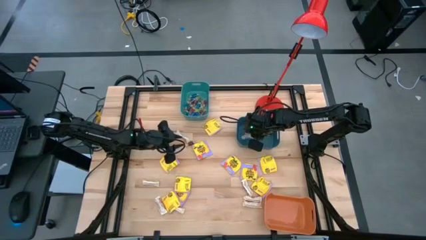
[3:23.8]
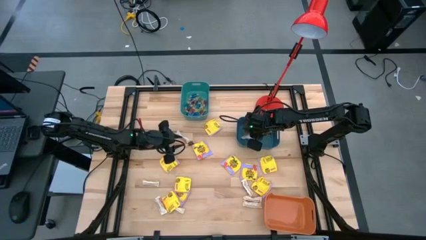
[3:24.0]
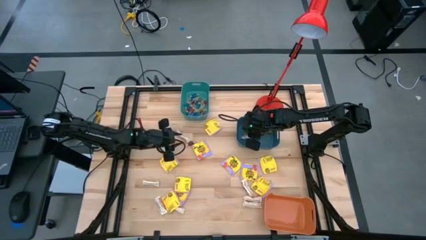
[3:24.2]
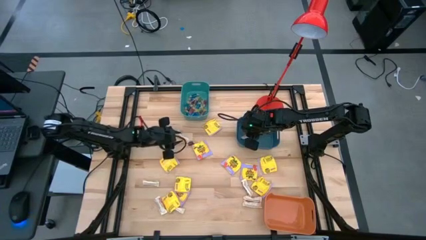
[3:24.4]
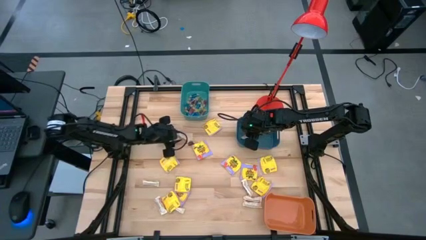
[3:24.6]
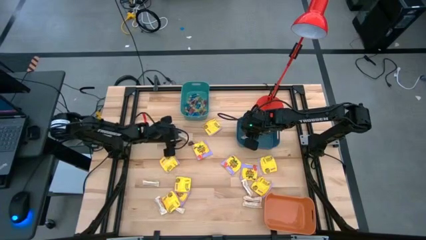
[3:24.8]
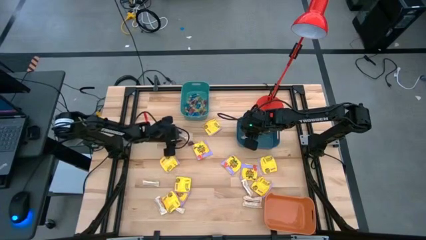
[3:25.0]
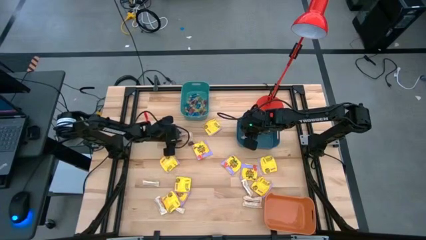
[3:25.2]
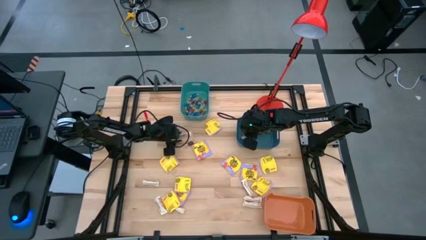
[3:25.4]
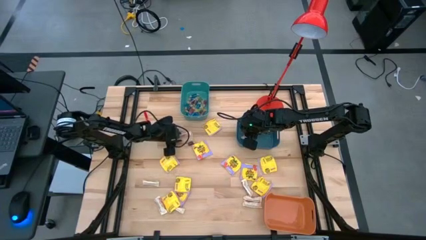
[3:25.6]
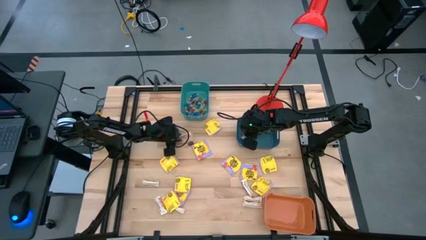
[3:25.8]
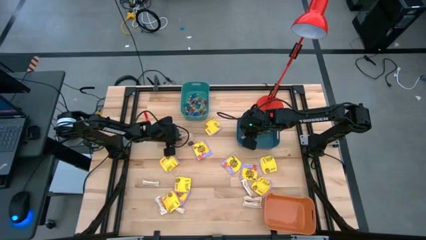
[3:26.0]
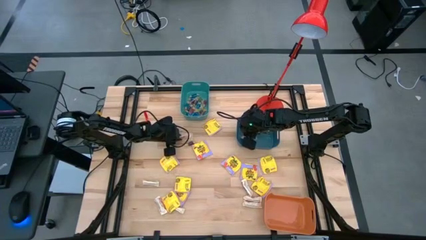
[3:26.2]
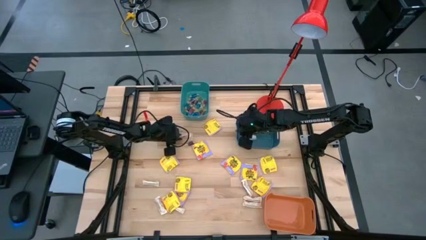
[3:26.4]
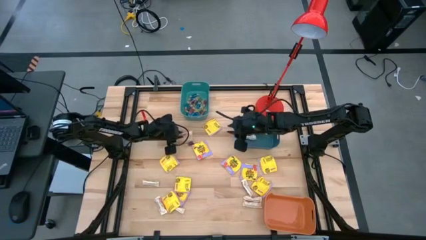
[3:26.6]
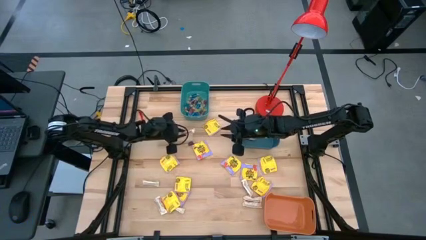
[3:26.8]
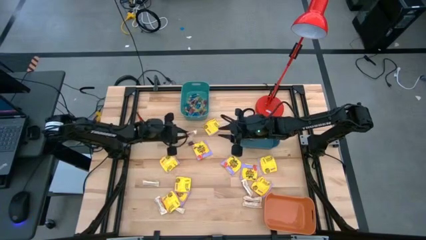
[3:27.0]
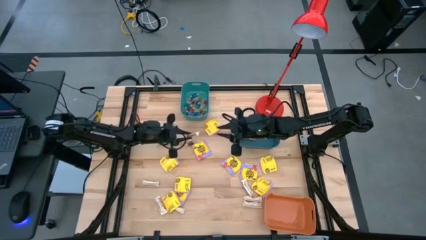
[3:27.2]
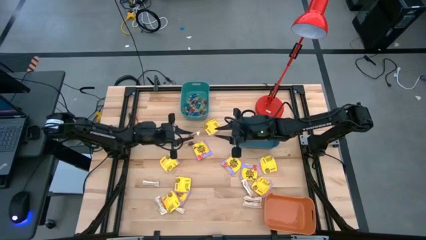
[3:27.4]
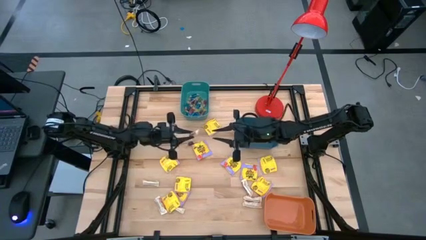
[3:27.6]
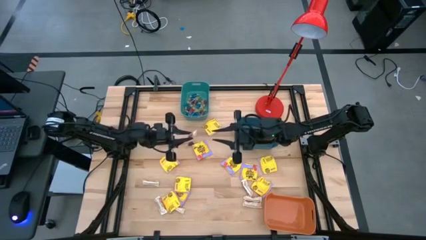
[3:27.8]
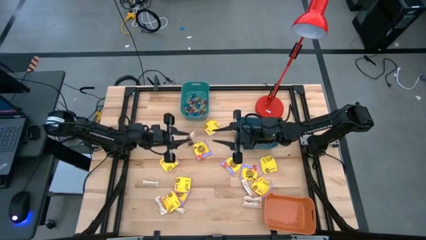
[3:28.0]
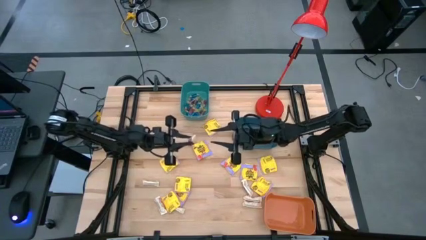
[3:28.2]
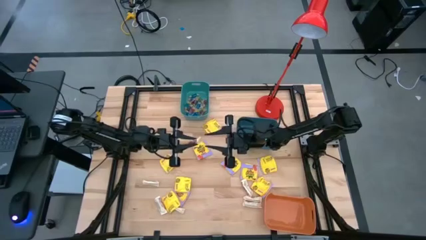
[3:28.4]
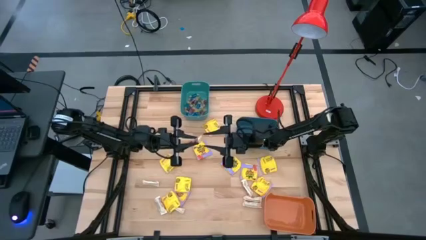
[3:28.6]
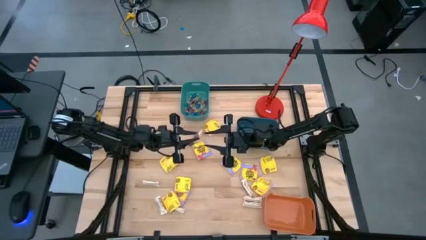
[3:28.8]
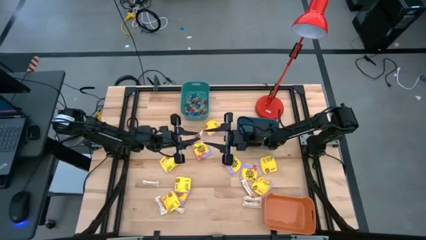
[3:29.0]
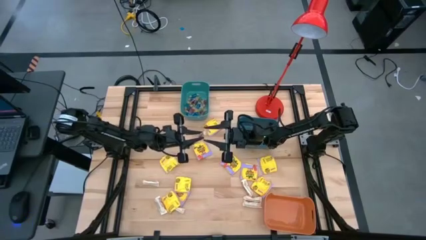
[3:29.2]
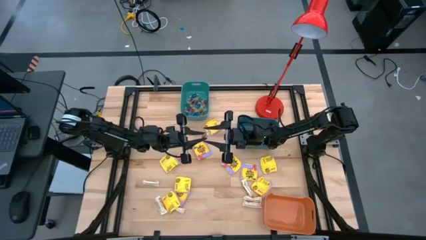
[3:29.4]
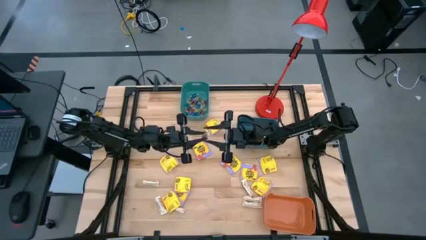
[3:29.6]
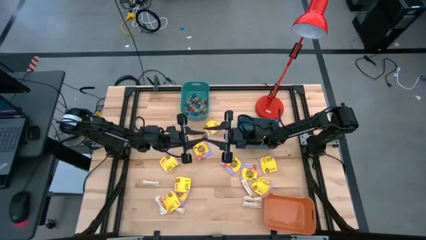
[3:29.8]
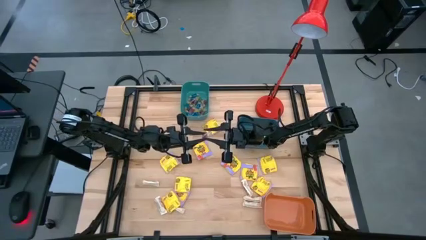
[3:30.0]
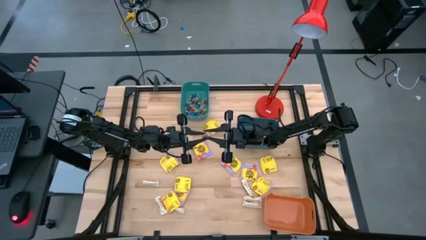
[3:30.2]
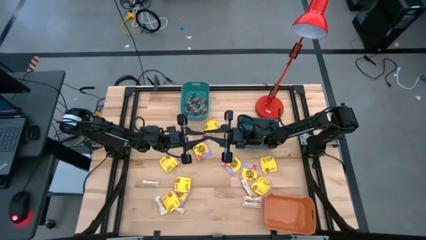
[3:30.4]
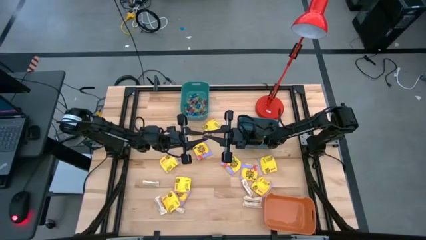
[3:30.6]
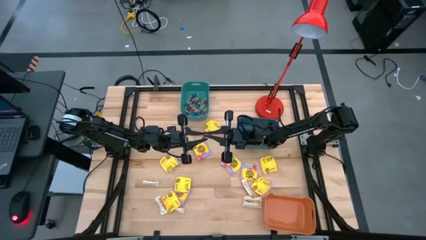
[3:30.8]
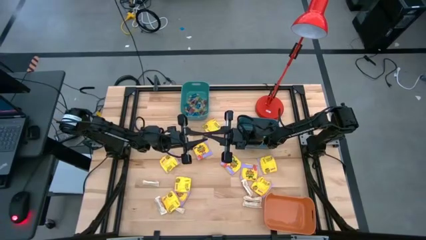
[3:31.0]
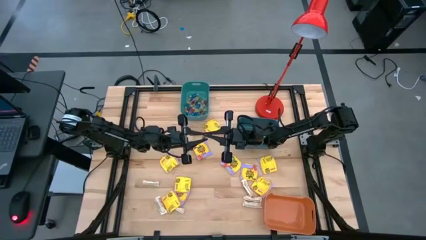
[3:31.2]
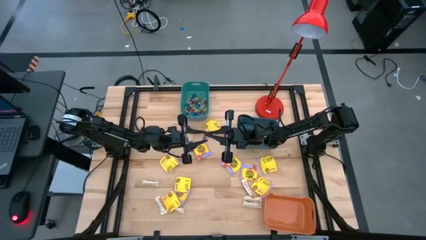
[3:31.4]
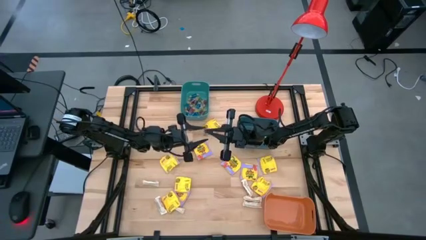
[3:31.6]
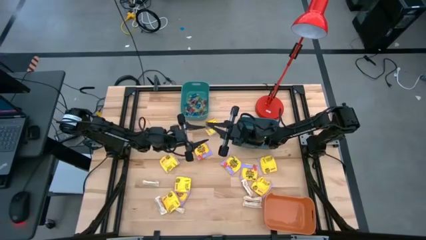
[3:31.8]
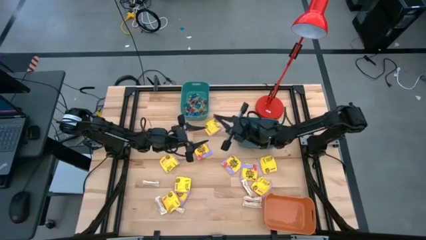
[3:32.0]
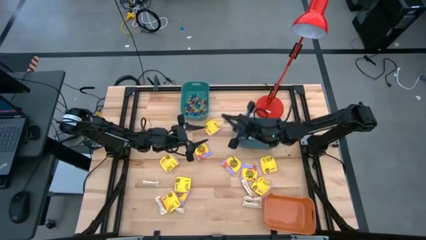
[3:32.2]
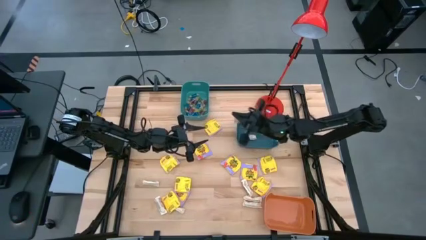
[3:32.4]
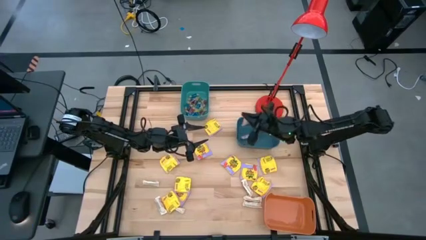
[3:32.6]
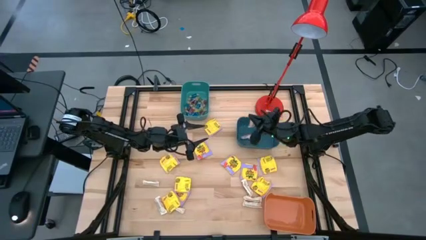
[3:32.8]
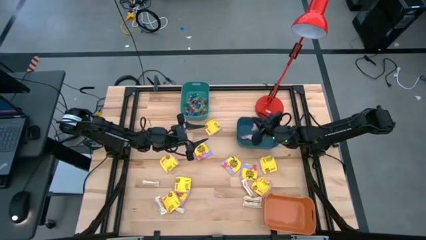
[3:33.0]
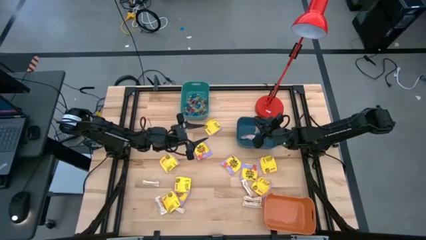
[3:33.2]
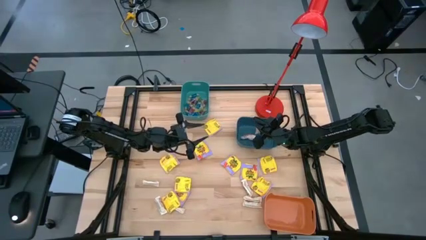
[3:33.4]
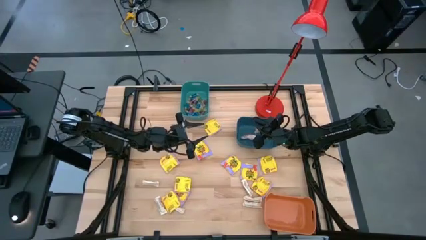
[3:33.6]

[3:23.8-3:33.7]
Task: Sort candy
Put the white chocolate bar into the blue bin

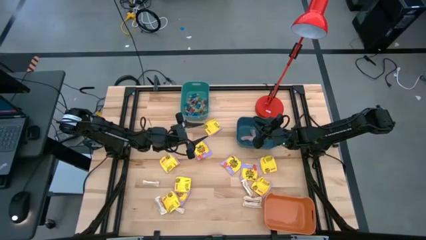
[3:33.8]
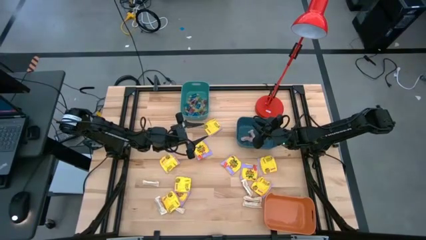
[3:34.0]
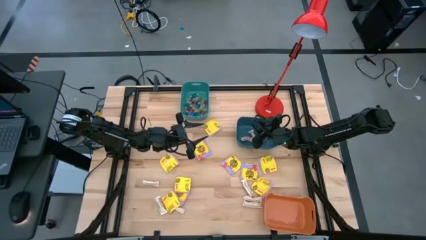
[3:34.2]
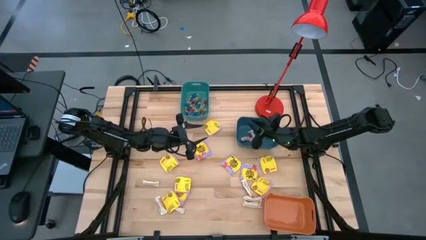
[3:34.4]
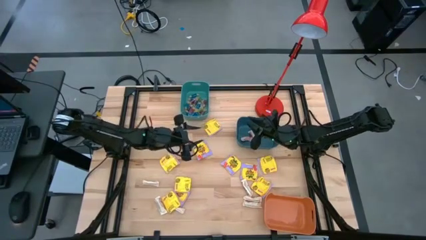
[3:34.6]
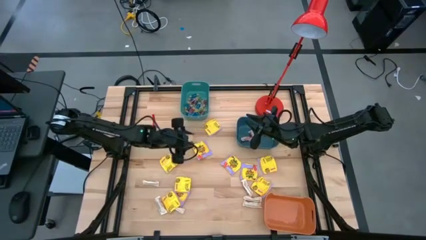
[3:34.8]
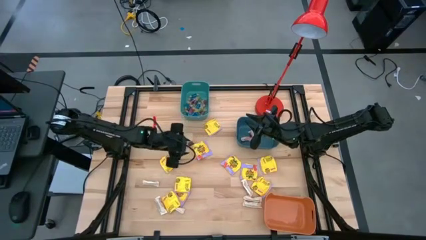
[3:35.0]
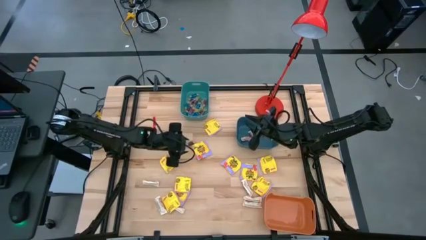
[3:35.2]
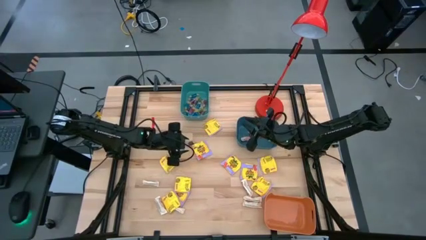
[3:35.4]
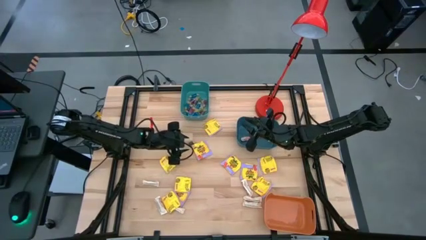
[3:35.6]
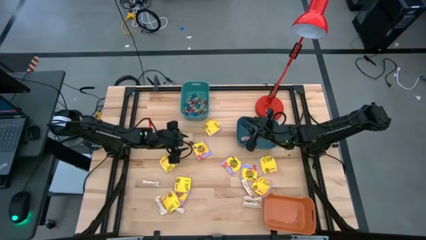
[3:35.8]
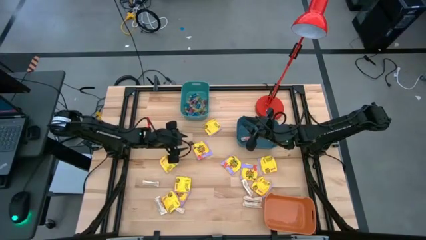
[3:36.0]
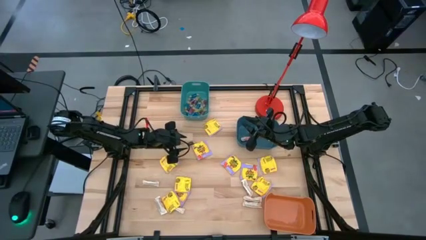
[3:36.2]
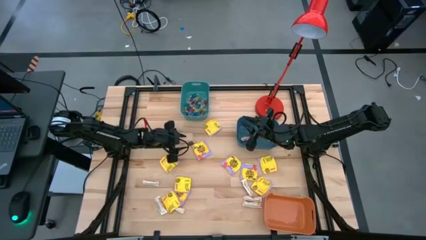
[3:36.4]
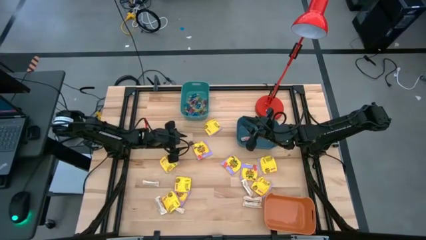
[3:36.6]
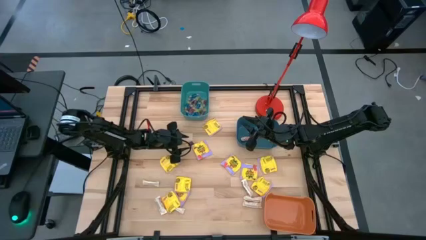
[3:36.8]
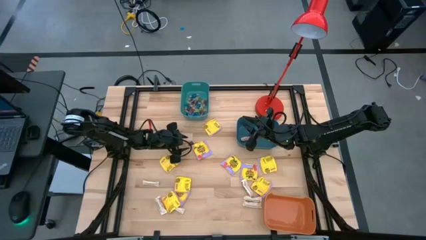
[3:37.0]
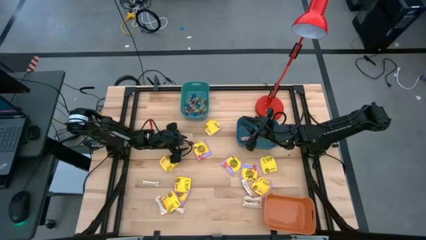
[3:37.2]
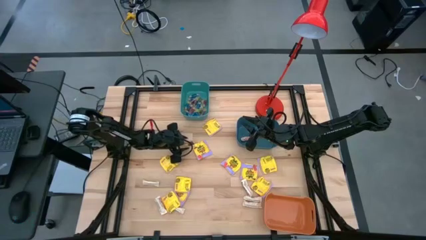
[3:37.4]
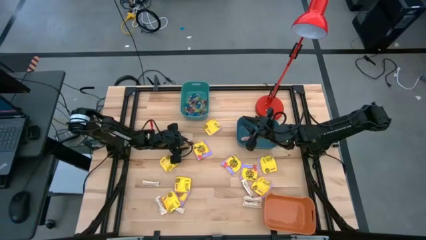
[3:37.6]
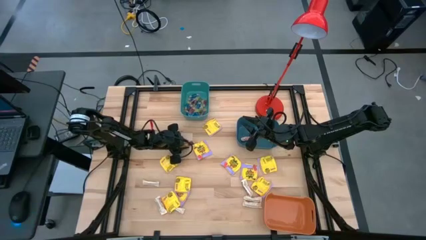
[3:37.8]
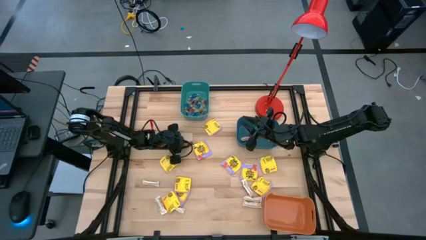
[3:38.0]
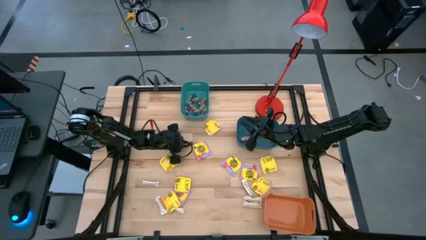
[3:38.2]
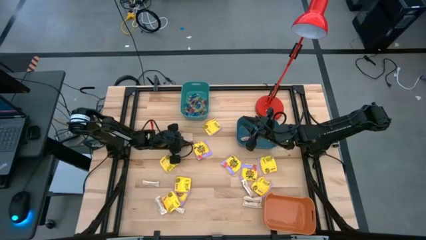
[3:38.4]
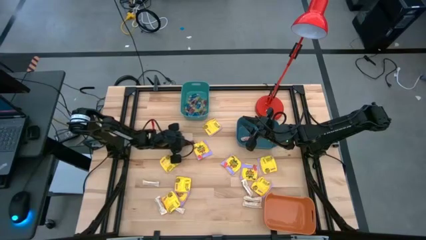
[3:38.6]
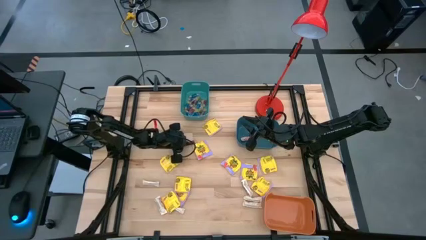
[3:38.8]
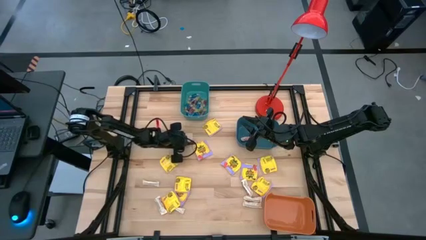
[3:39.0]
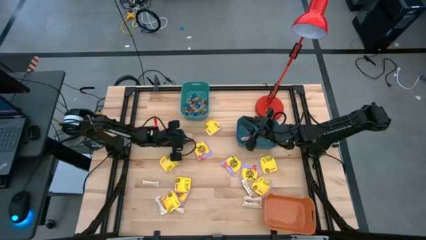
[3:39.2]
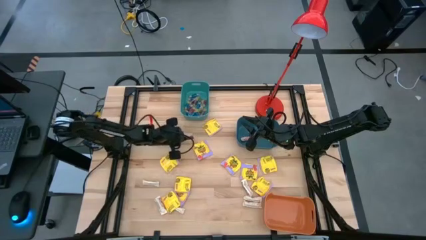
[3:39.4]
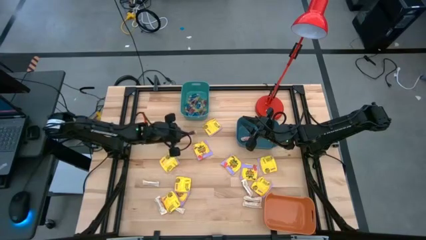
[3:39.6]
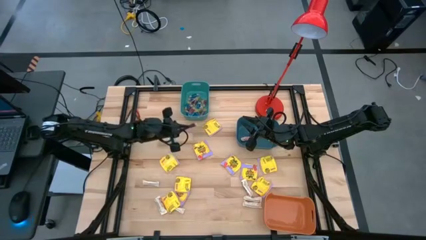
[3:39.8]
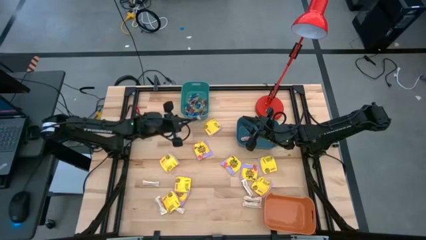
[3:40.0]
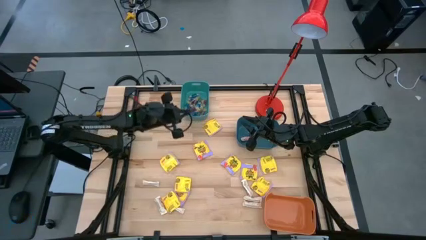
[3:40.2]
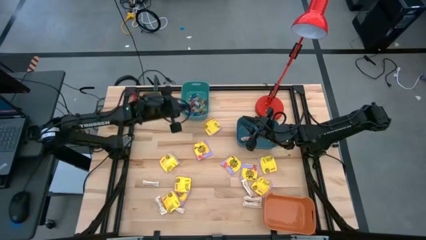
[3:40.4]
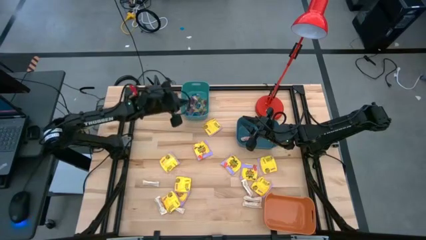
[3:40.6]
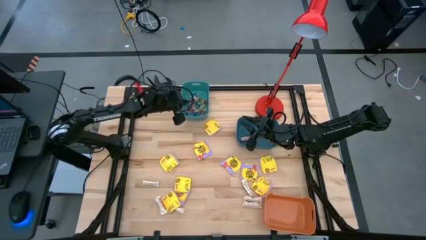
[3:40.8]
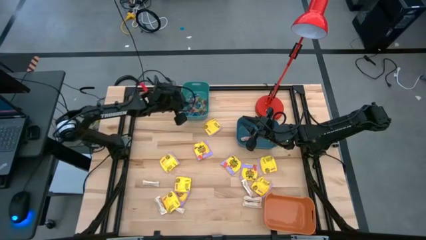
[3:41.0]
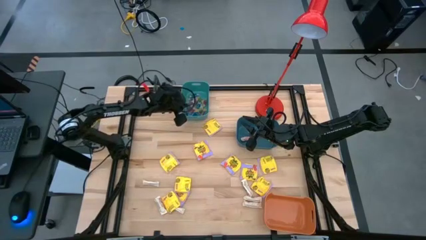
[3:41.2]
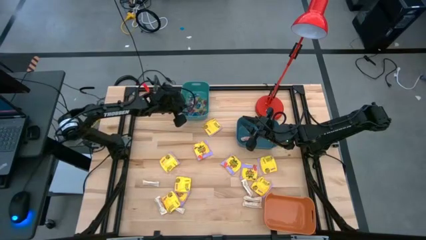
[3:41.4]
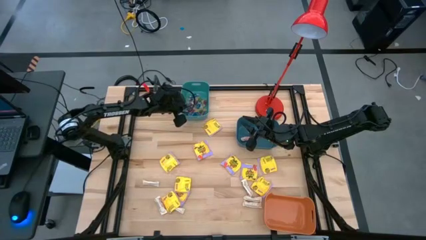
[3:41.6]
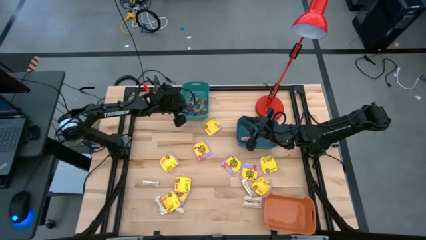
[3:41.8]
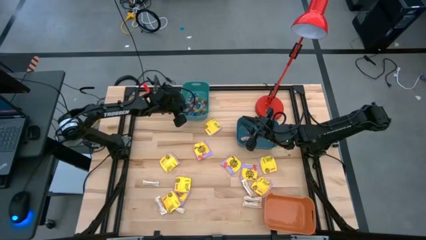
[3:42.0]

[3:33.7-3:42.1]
Put the violet candy into the green bin
